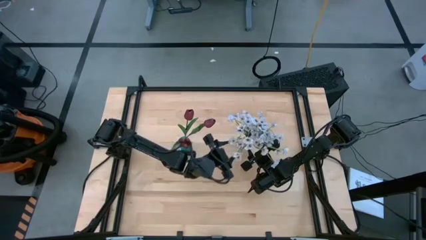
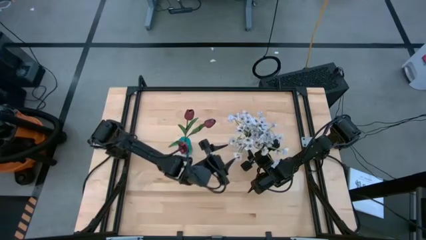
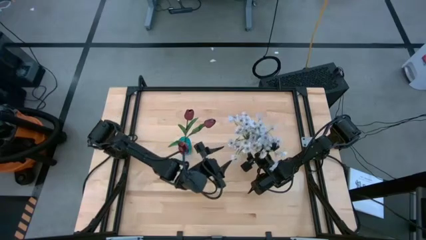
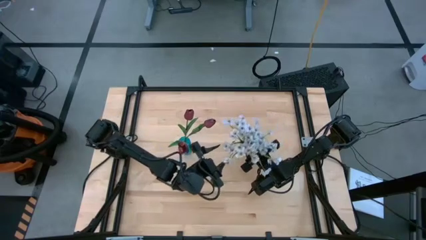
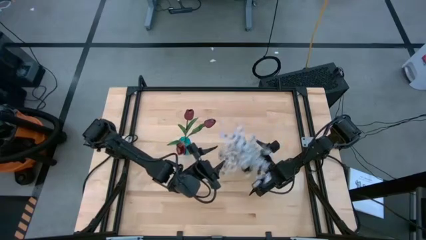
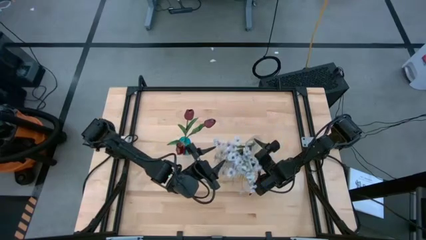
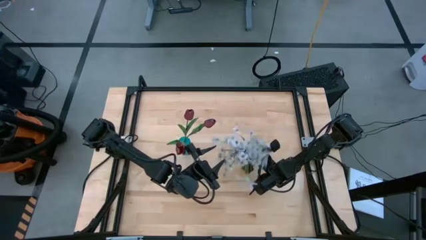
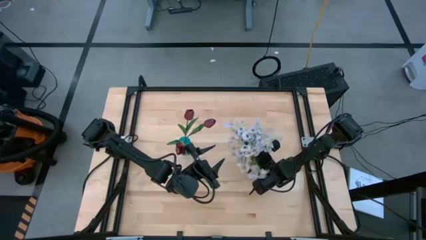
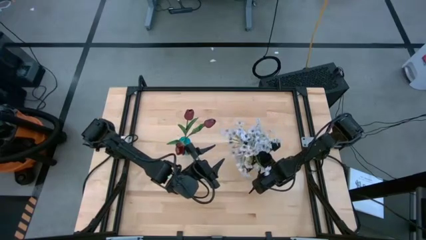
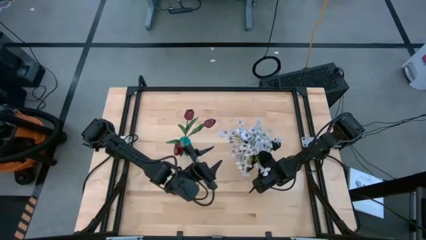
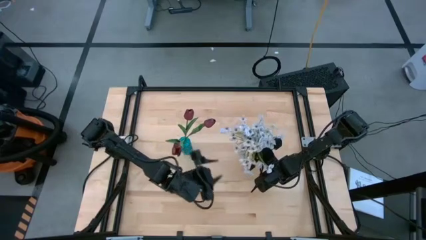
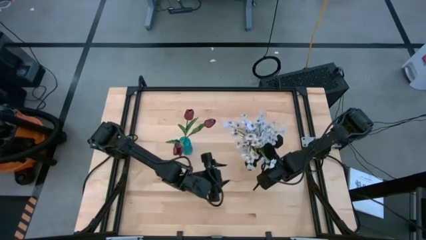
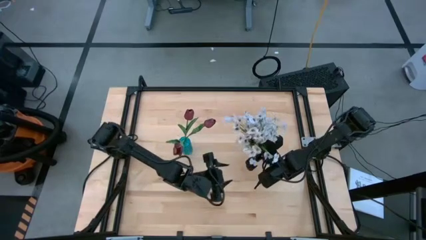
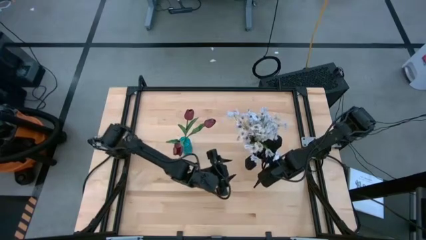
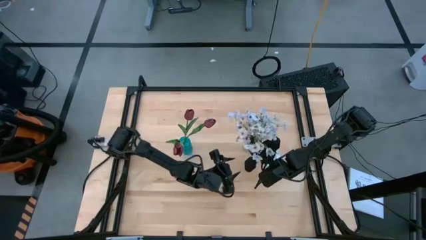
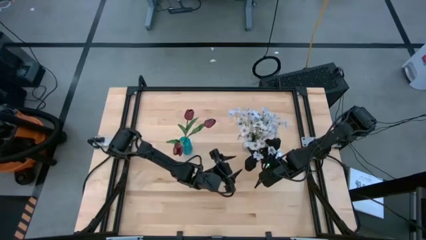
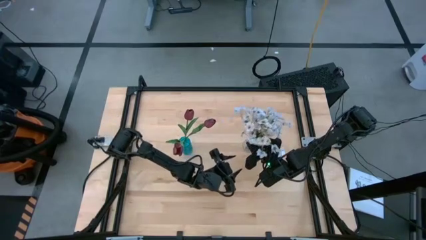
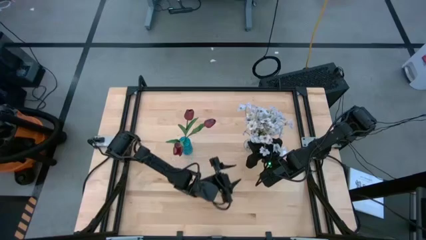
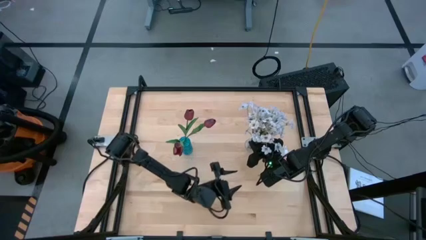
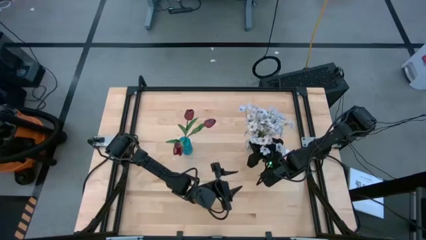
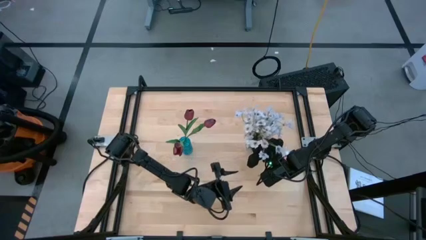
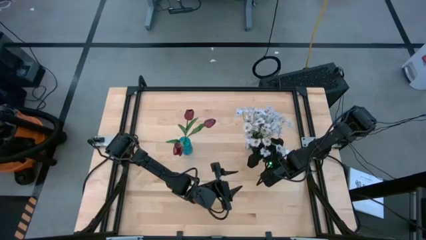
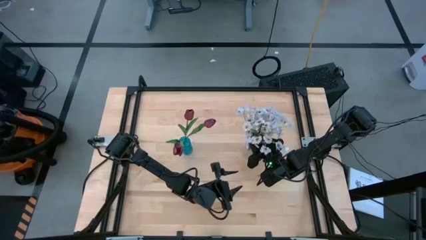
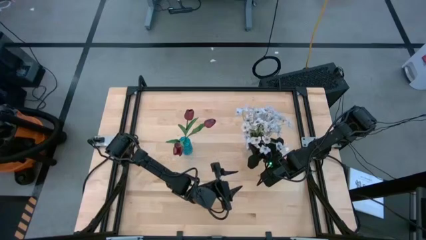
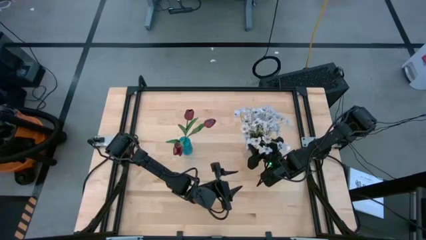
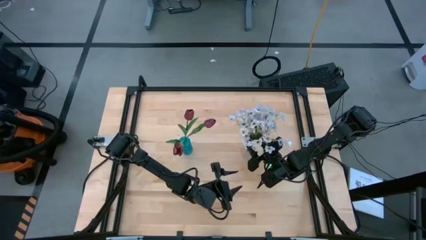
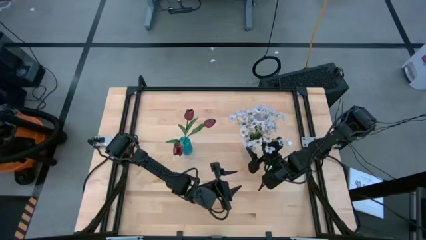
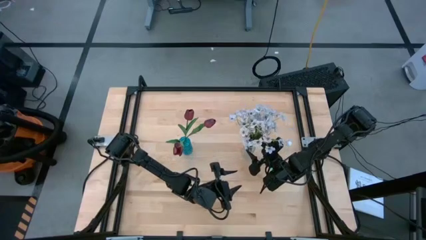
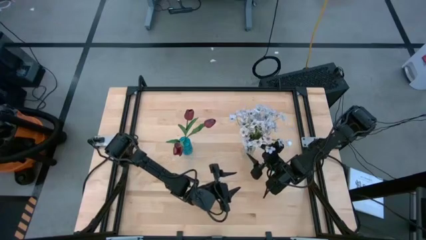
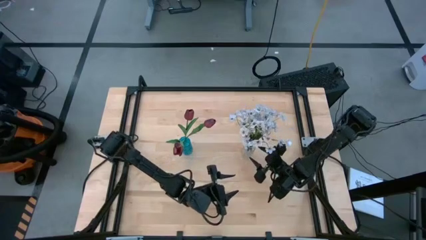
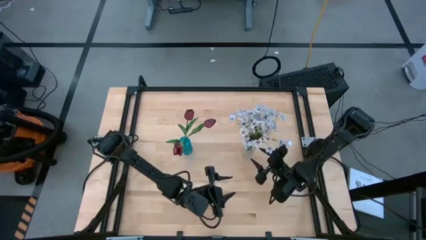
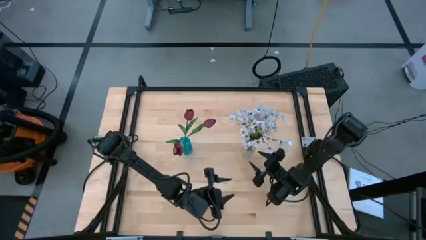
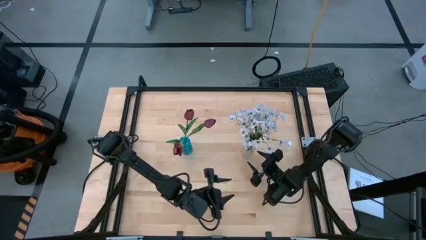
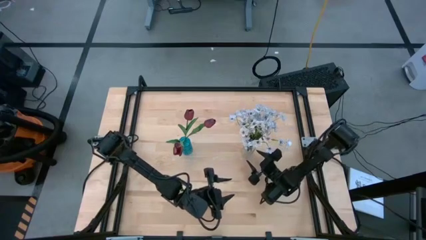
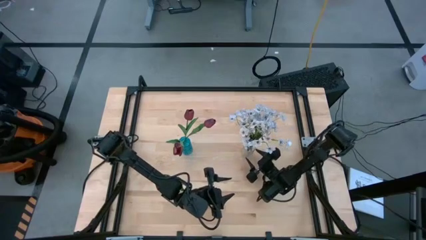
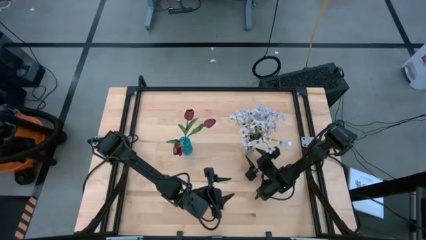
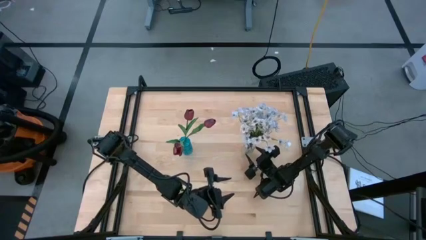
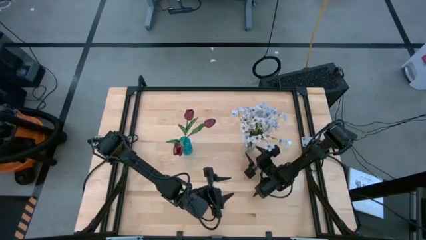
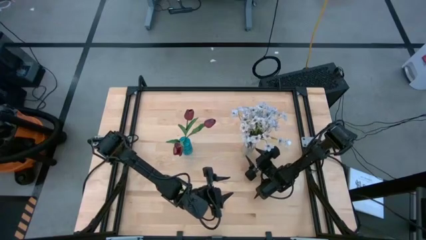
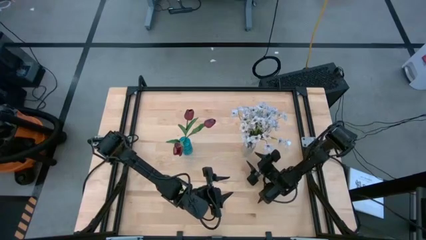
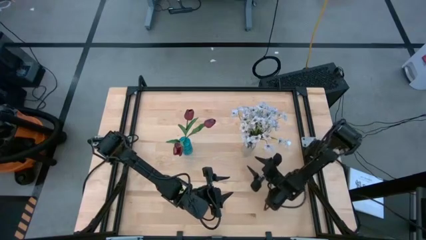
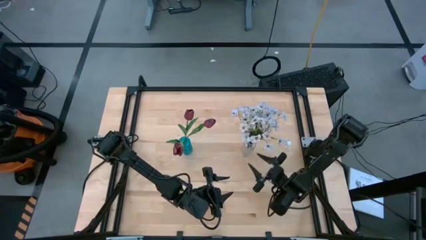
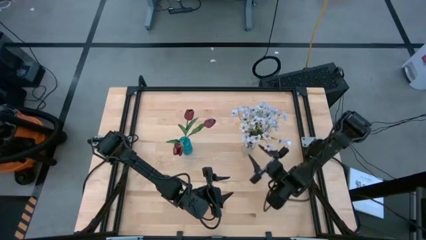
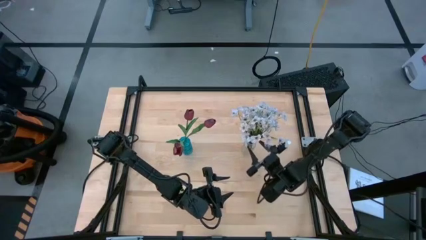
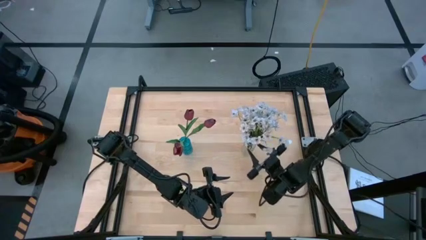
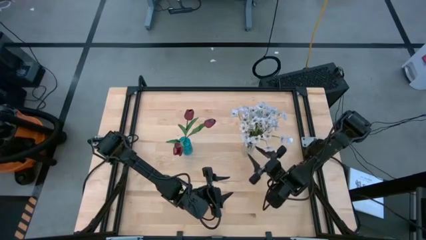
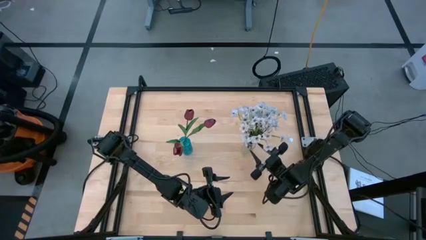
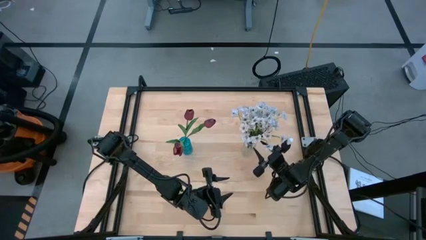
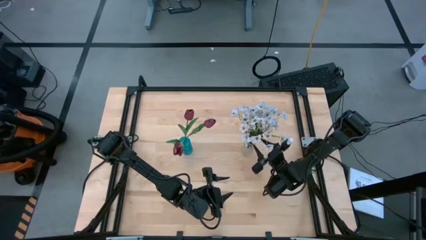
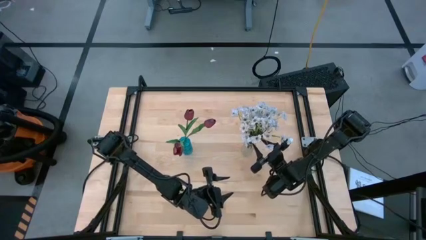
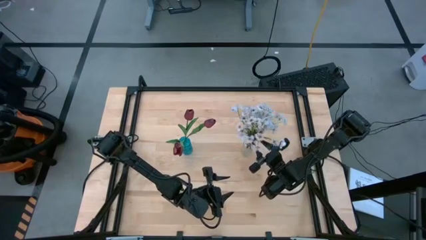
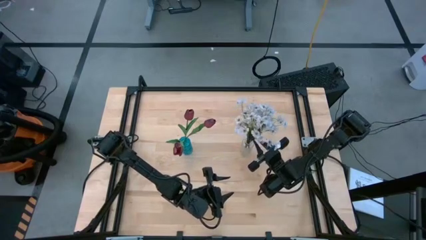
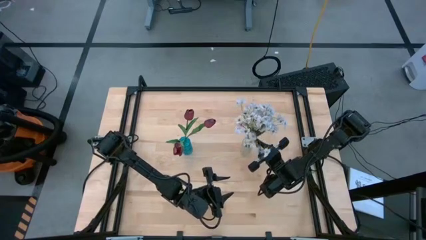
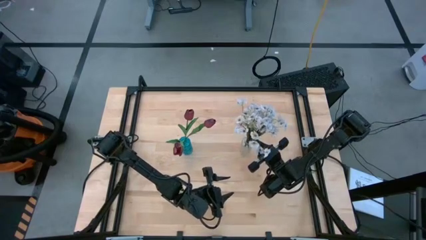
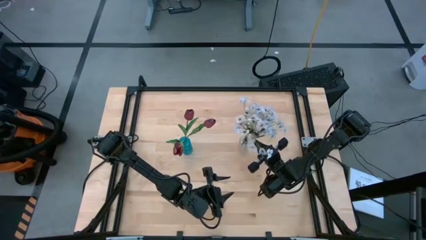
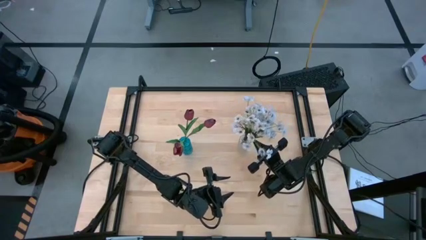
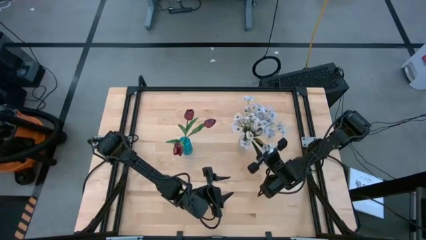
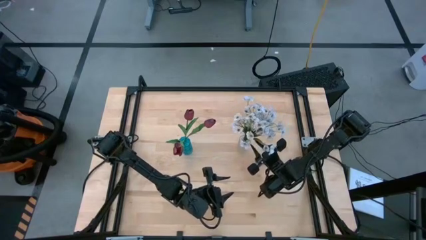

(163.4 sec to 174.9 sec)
Task: Sort flowers into vase by color
Adjust the transparent vase

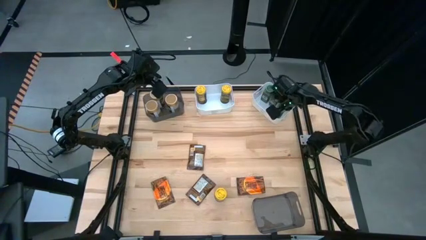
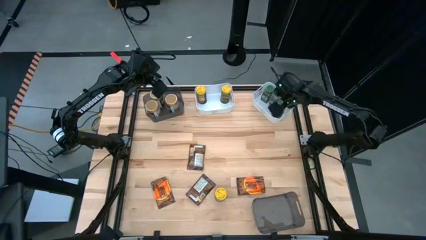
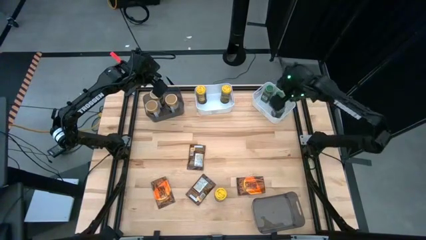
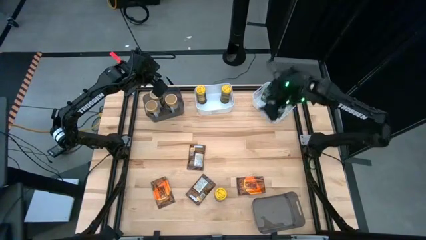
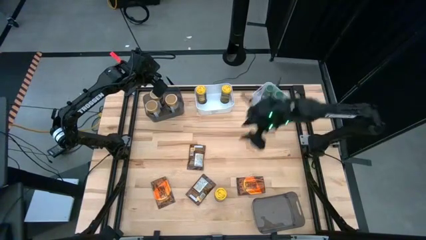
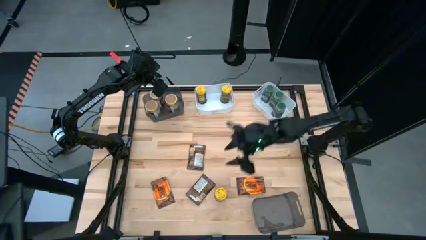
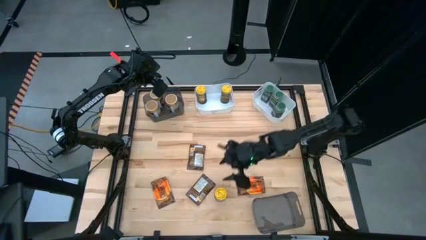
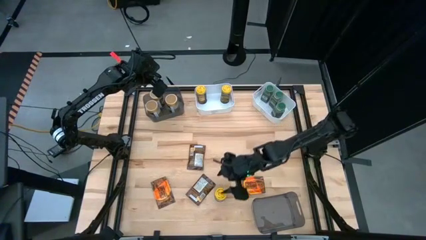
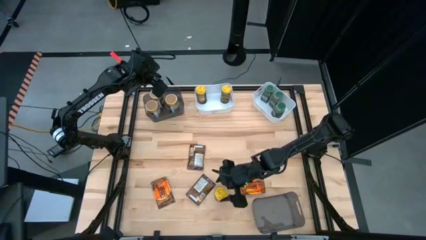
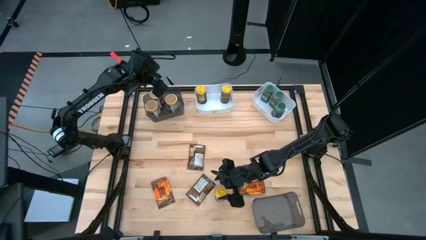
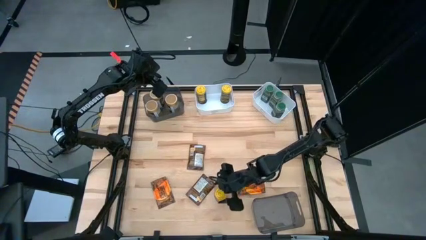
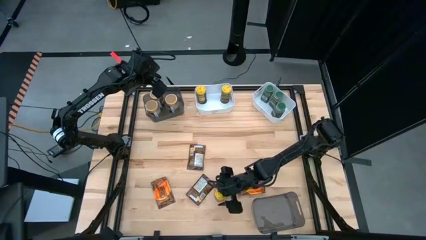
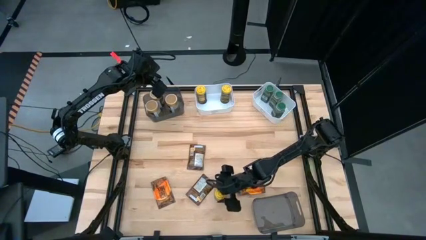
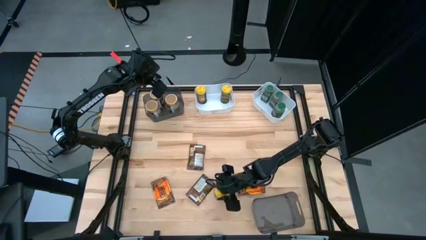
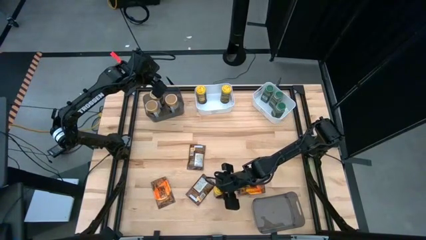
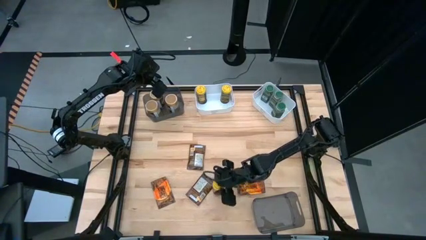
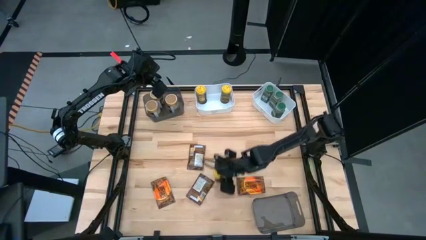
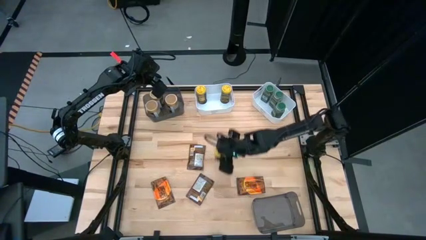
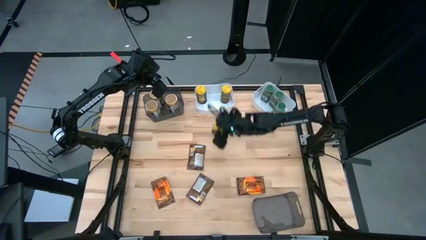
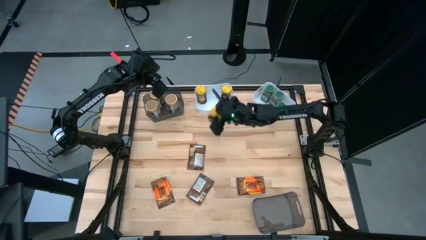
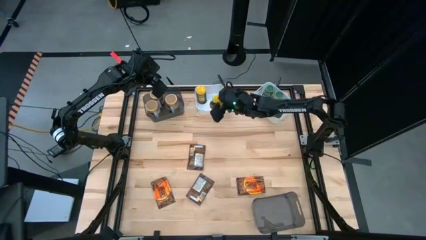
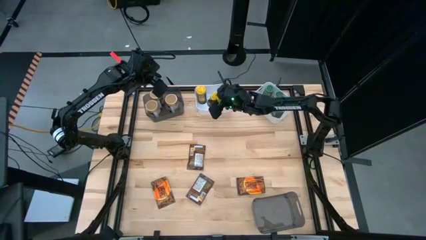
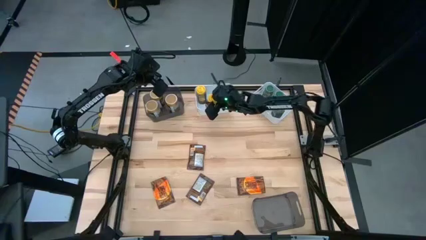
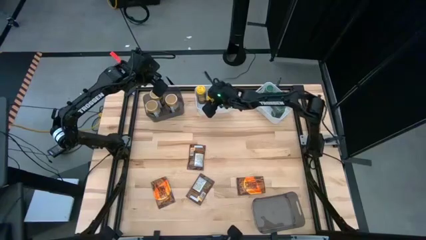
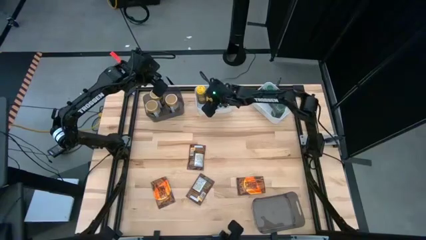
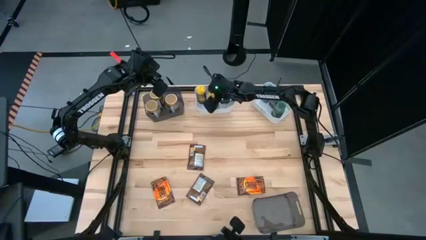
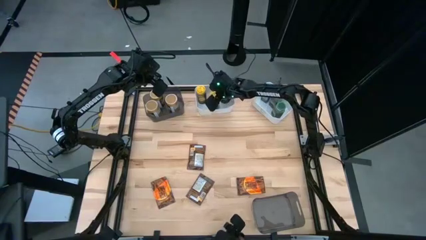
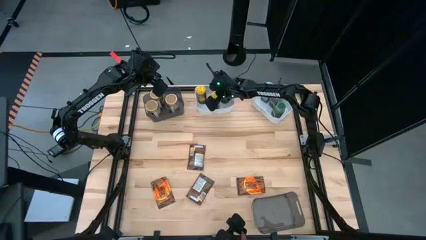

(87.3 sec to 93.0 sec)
Task: Sort spices by type
Put the yellow seasoning bottle into the left white bin
